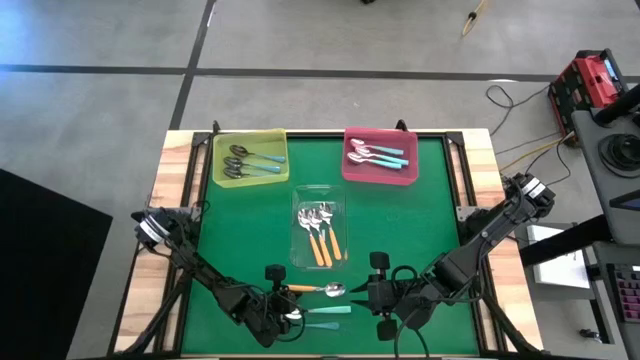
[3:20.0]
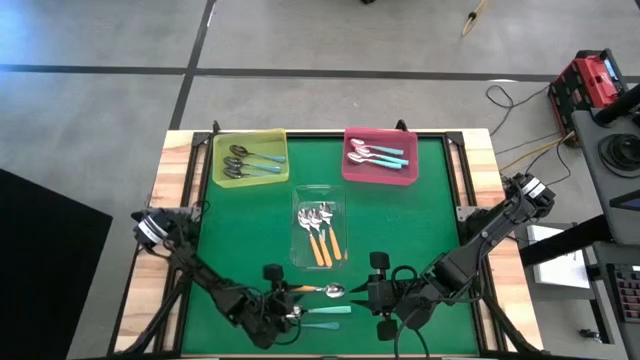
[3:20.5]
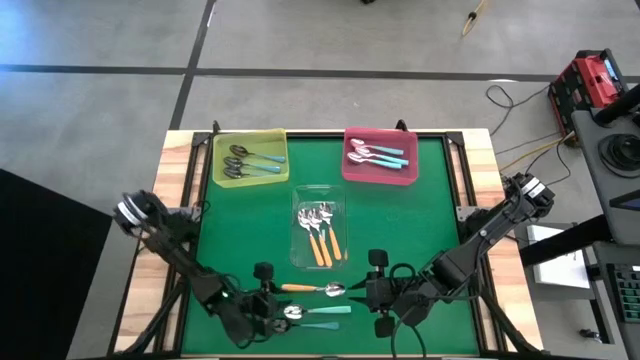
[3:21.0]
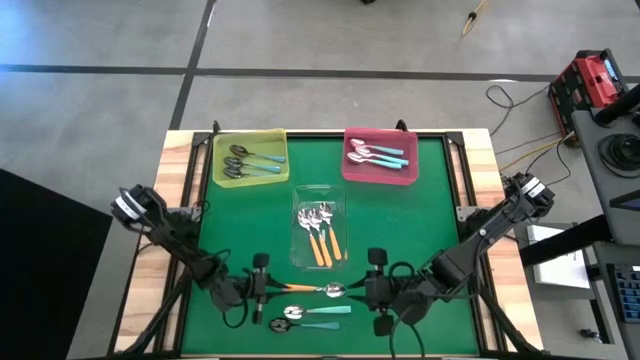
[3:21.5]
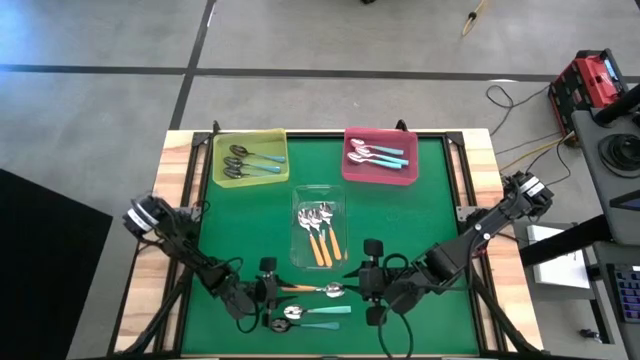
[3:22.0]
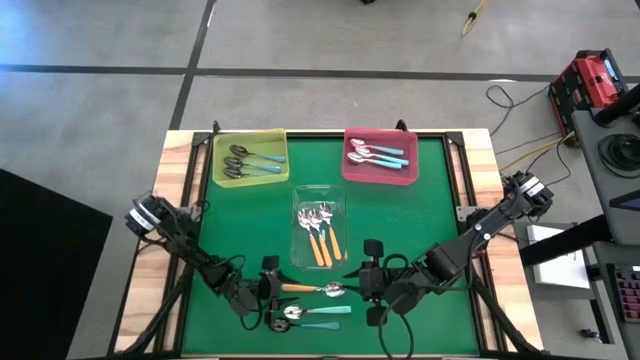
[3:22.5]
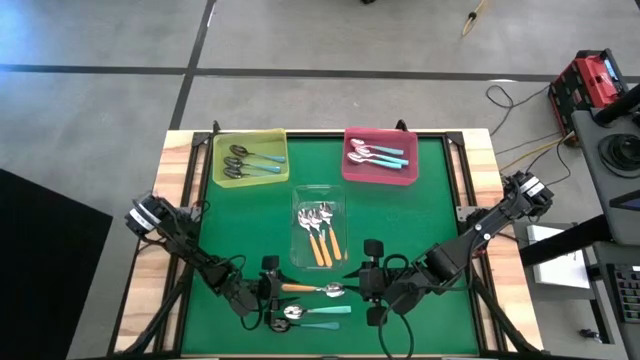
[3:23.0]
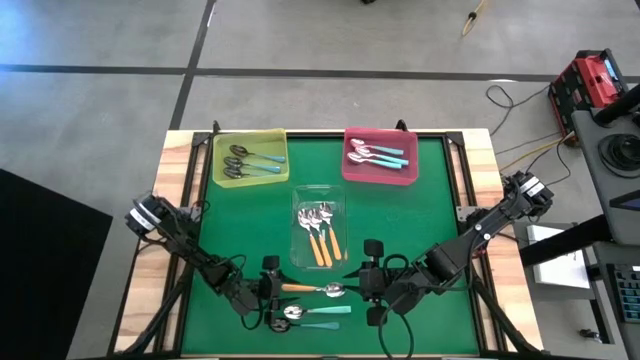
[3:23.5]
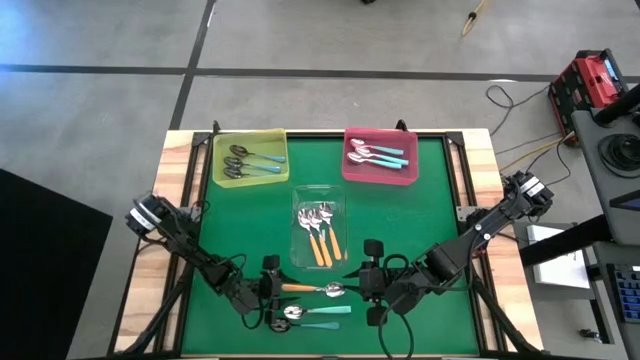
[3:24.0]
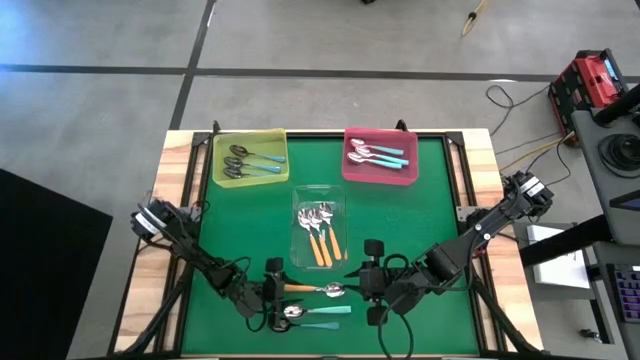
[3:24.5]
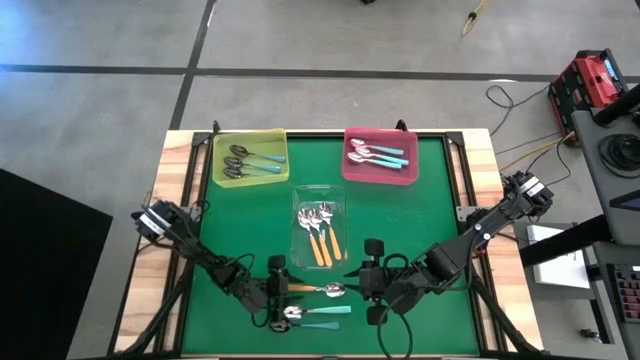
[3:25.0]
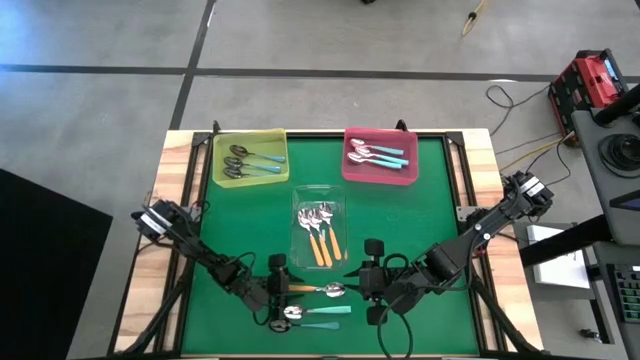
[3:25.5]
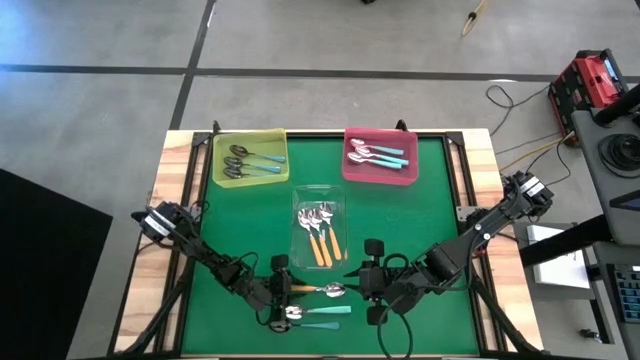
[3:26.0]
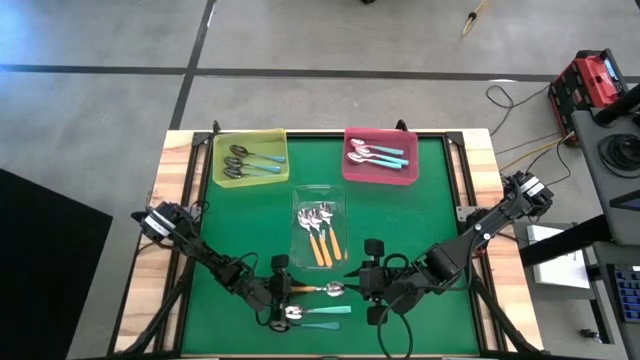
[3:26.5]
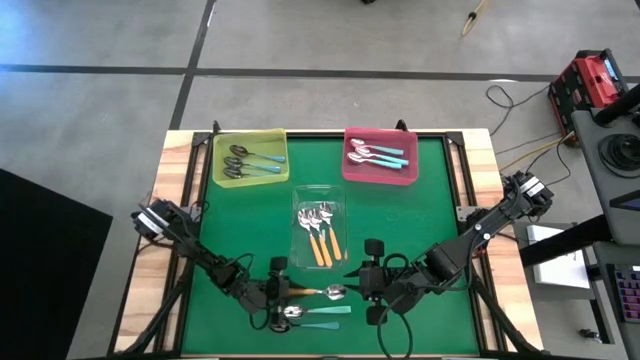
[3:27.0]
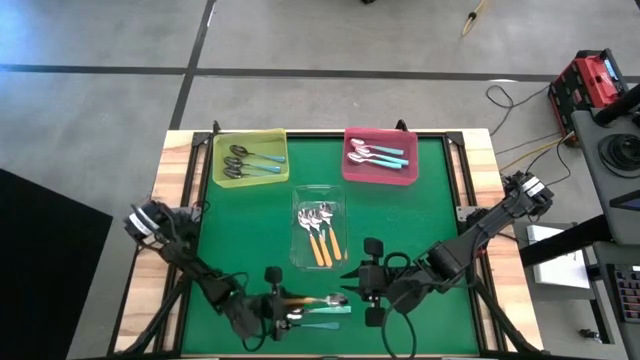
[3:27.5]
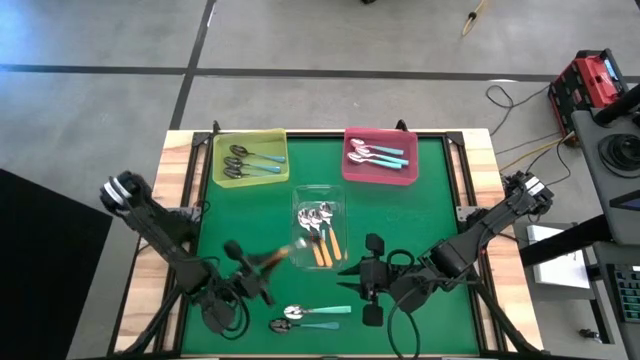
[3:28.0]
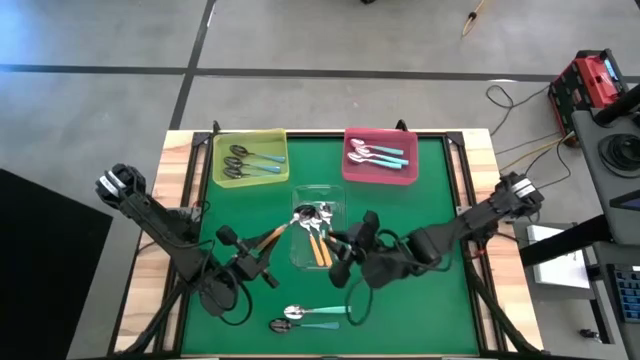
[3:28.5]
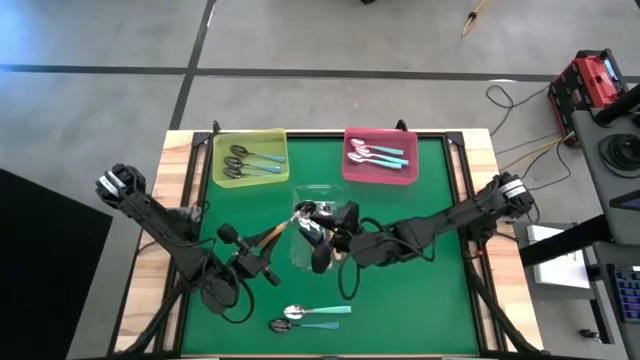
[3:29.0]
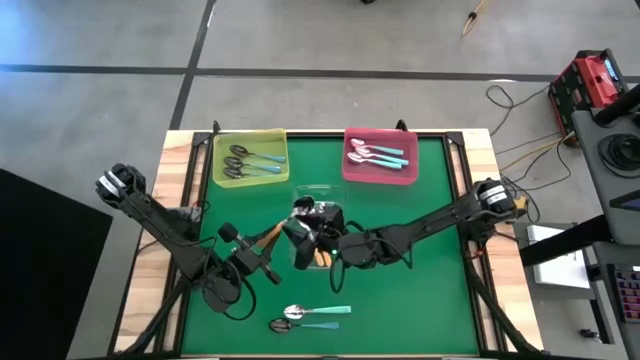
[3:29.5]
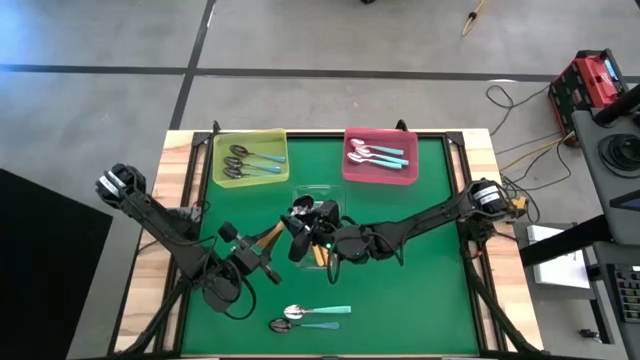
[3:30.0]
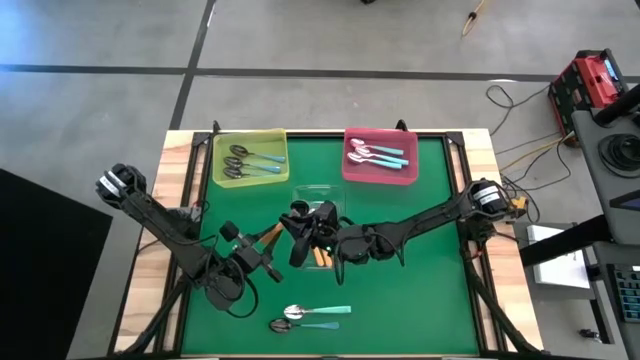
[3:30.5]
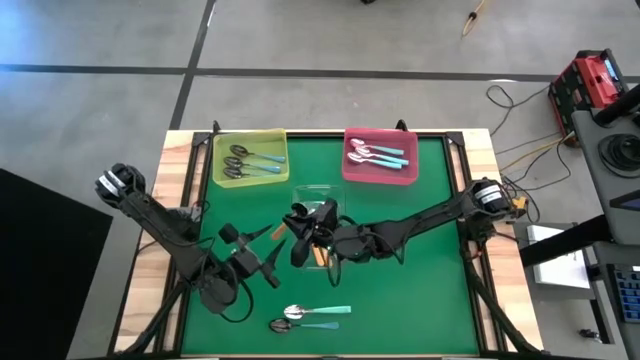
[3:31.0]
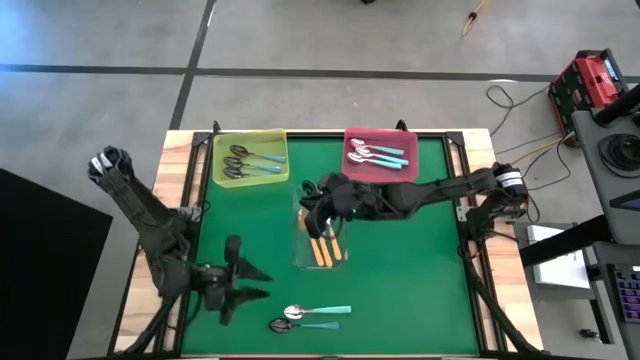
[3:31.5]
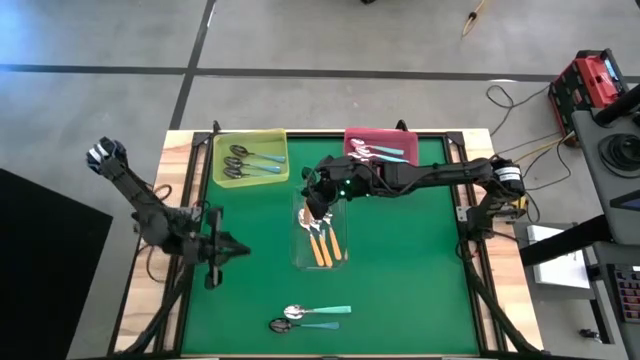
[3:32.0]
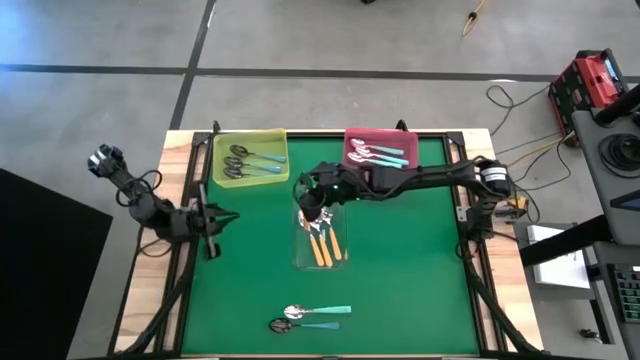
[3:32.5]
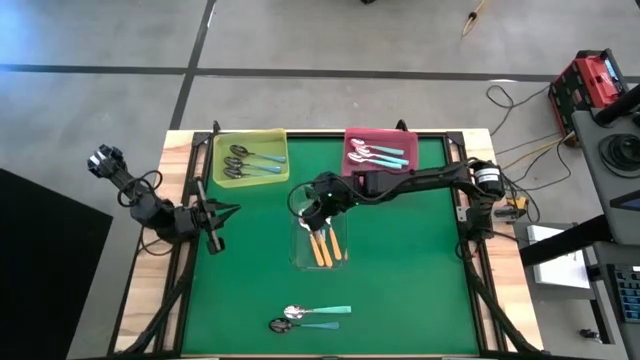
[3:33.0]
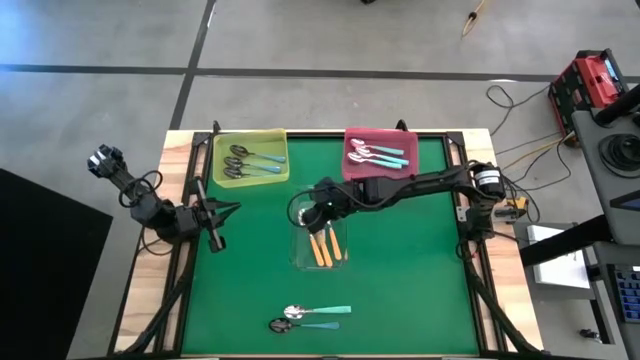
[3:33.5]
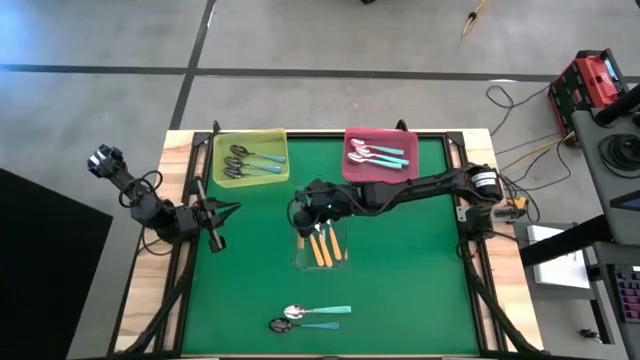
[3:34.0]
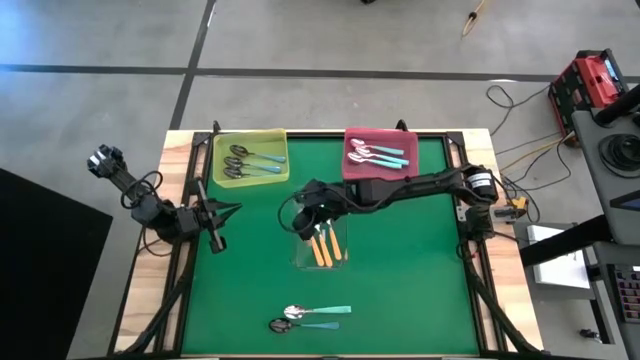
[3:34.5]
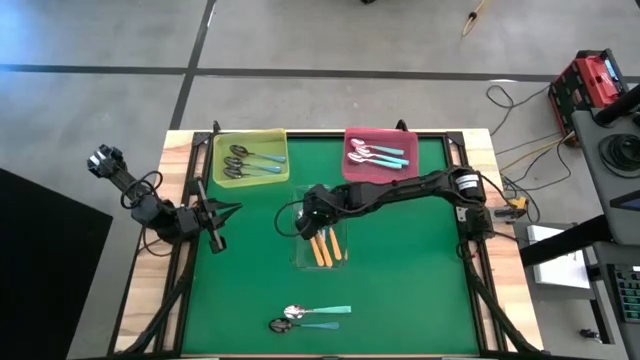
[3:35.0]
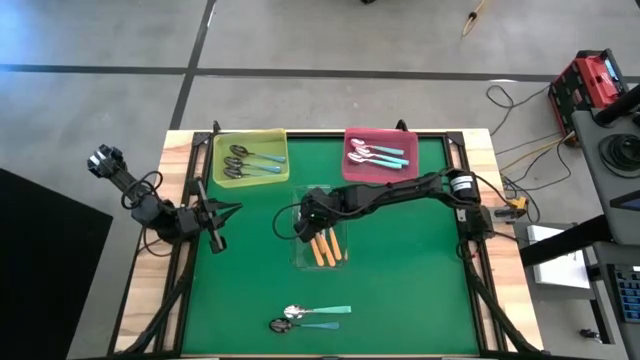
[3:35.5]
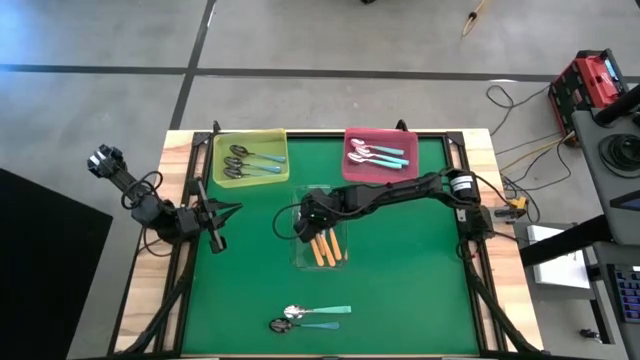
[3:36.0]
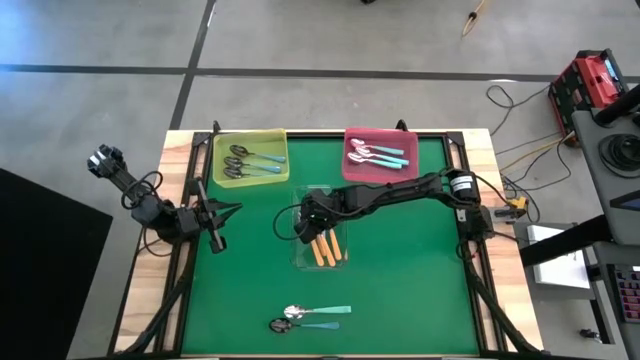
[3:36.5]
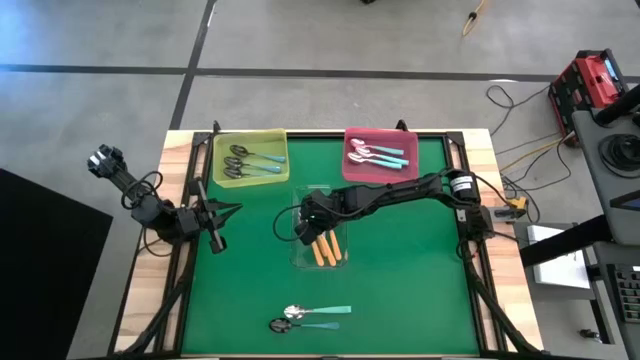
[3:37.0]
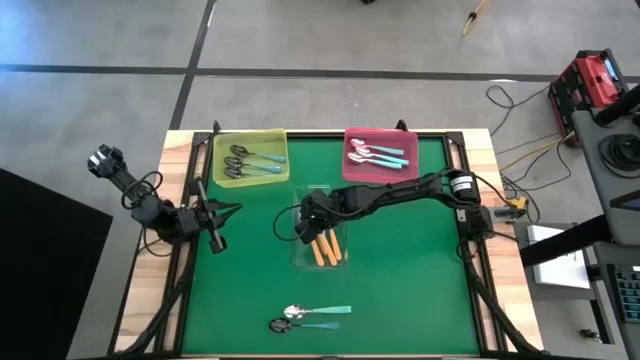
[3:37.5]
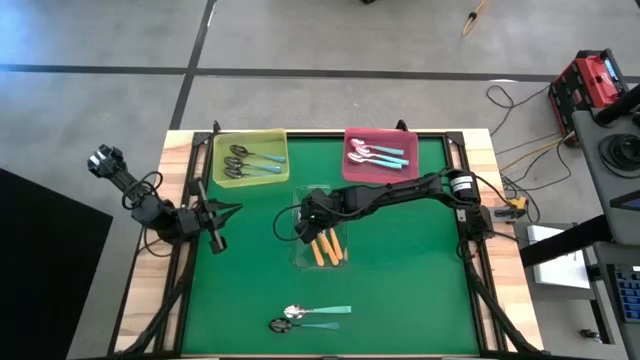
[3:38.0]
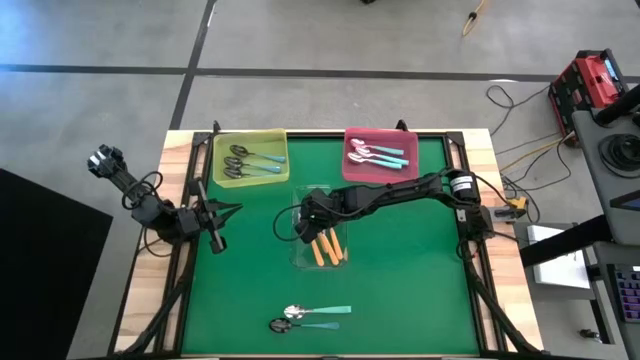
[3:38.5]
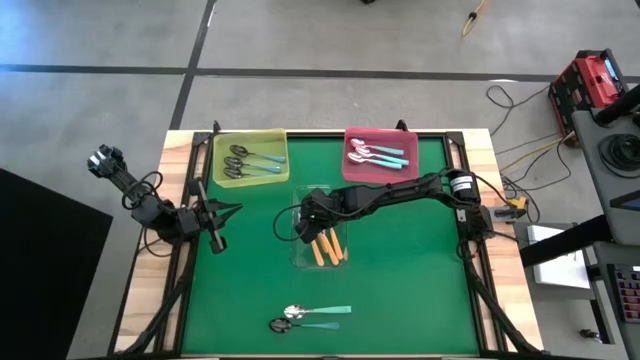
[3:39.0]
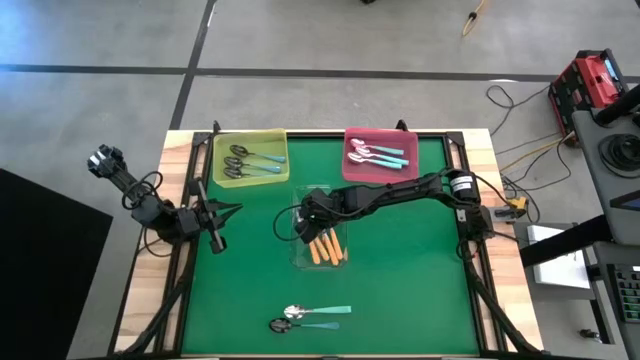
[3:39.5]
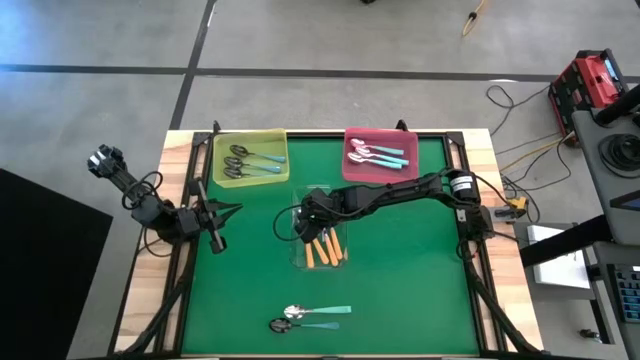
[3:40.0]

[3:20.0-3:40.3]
Task: Sort silverware by color (type)
Put the yellow spoon into the transparent bin

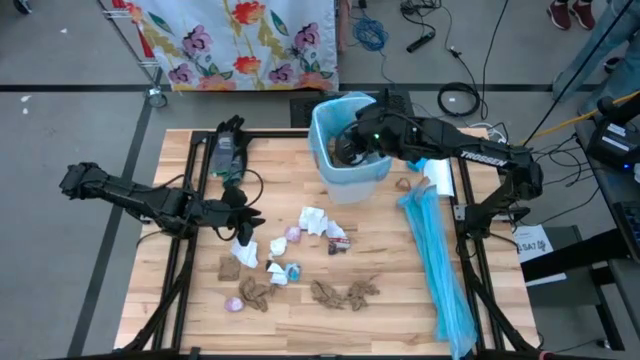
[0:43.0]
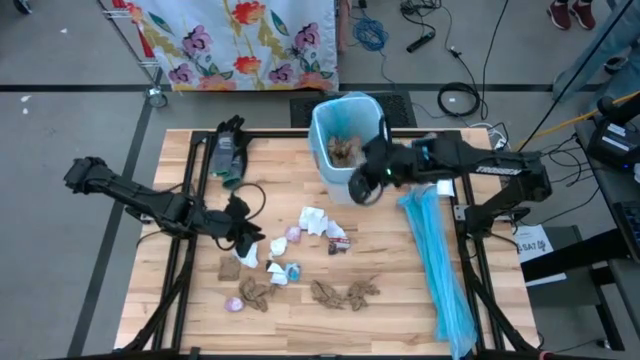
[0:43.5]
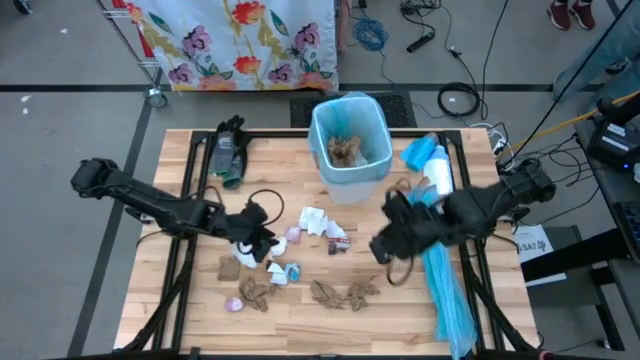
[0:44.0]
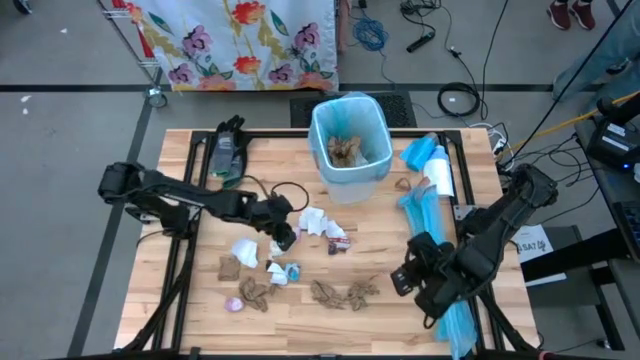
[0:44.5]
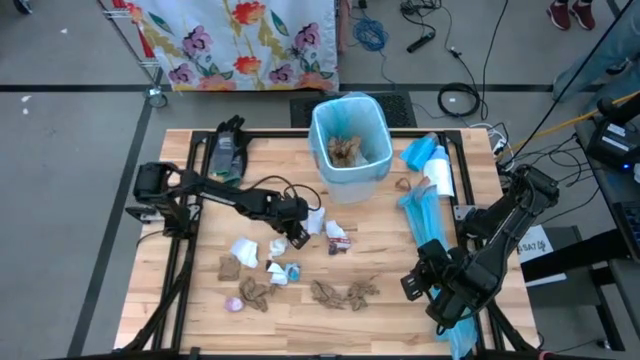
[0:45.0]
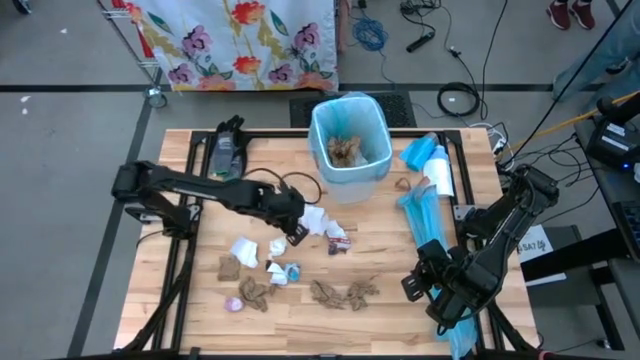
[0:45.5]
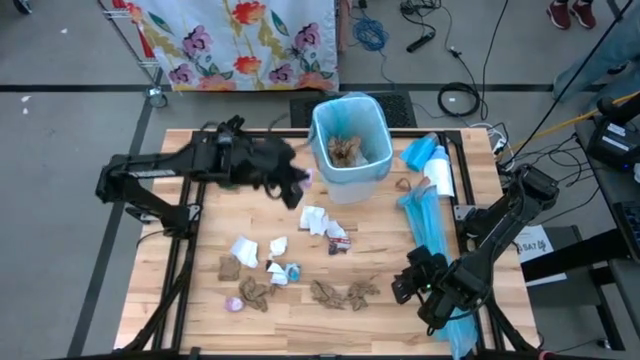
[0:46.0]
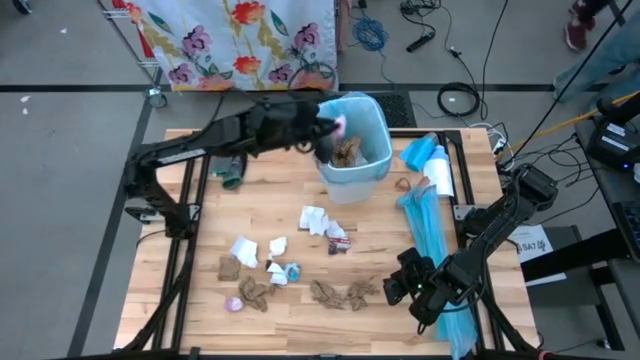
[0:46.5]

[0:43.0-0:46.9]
Task: place trash/remove bag and relplace
Put the crumpled pink trash bag into the trash bin
